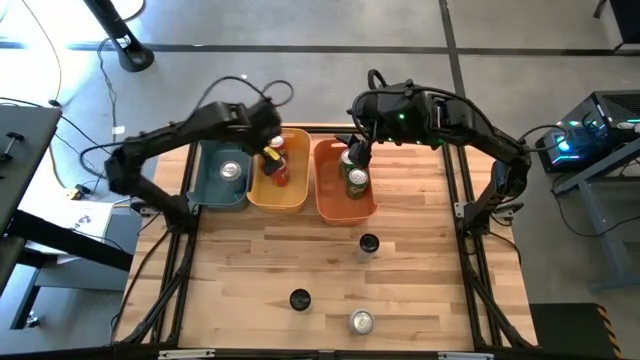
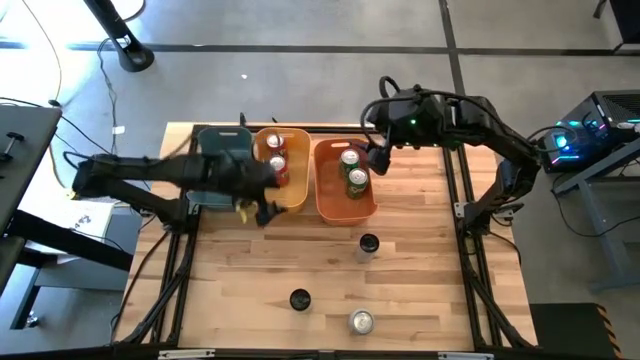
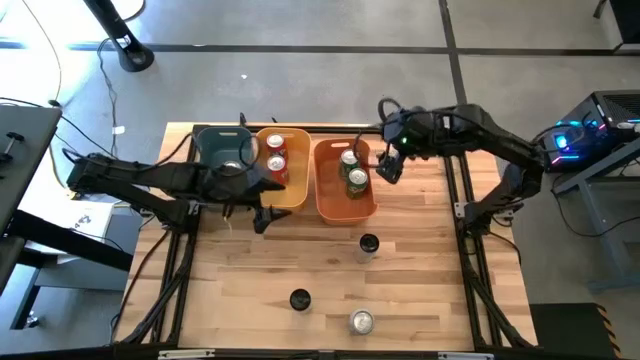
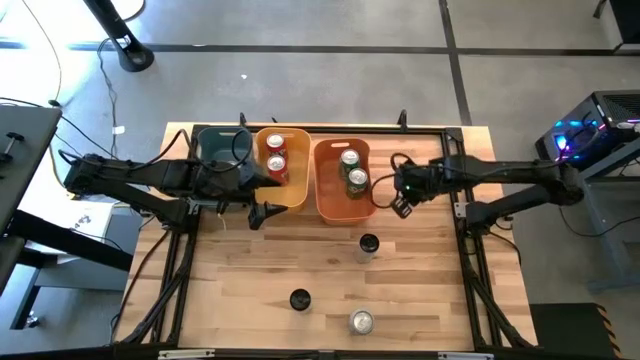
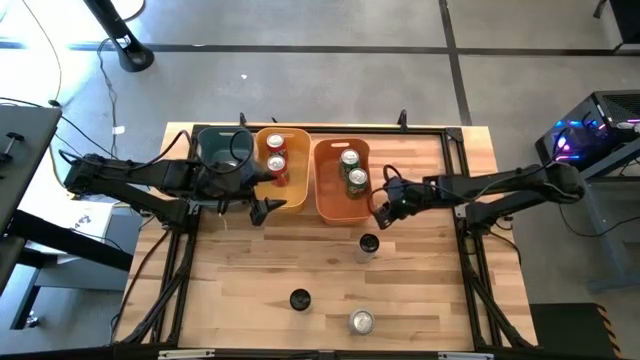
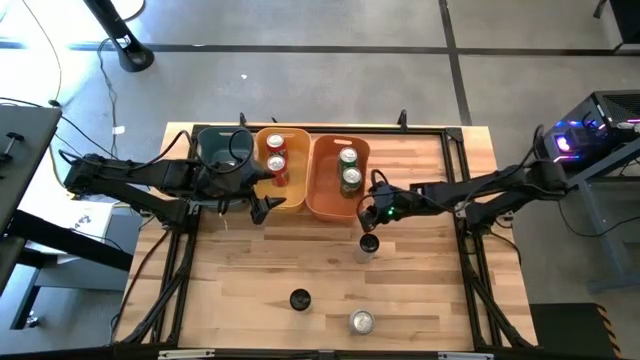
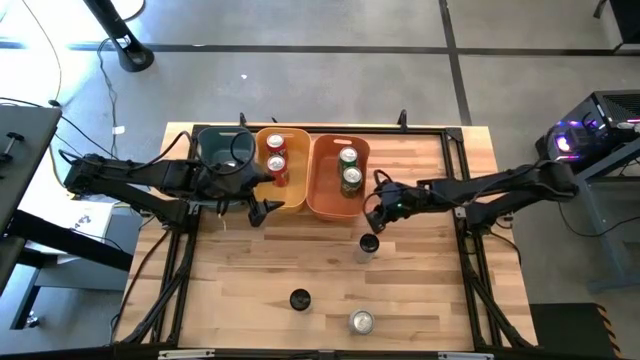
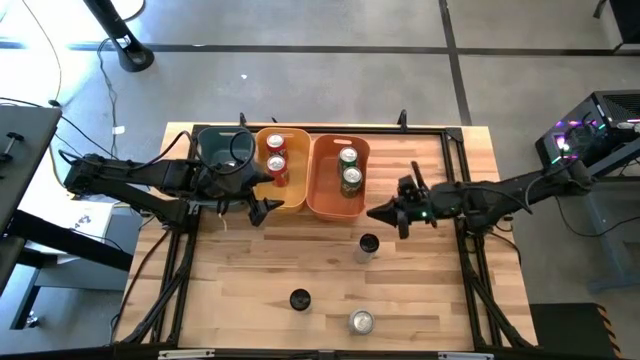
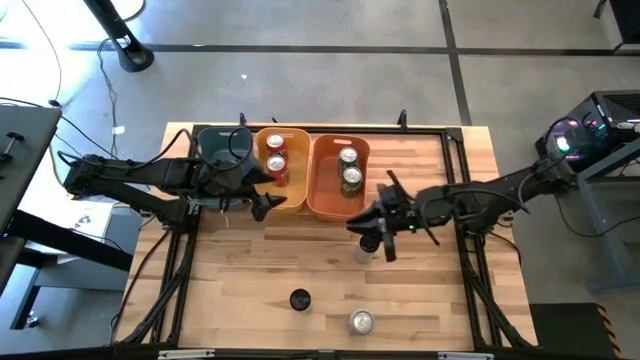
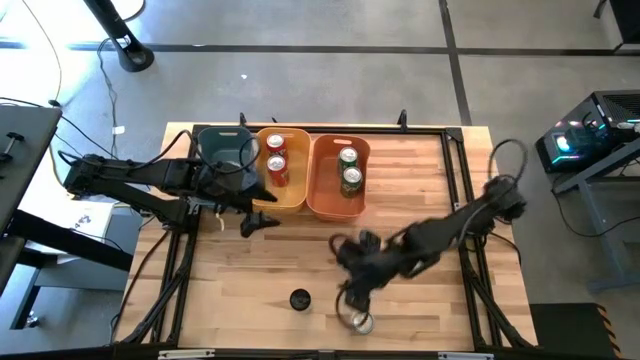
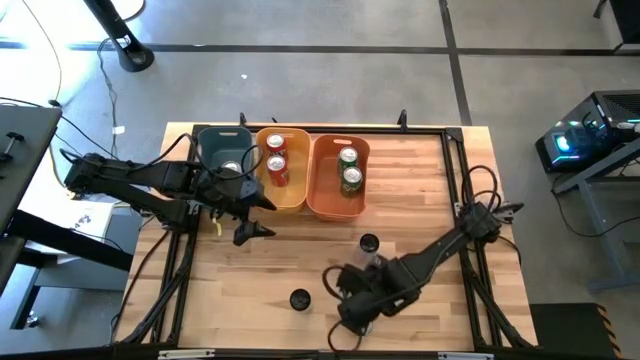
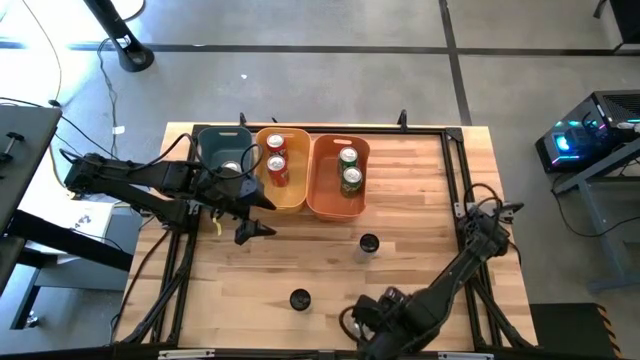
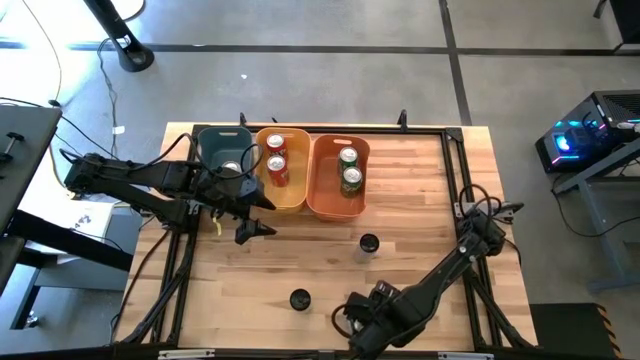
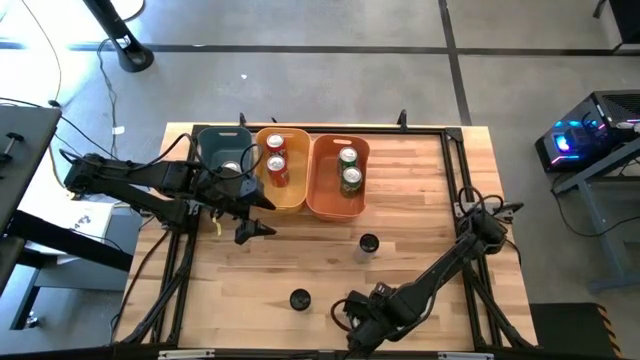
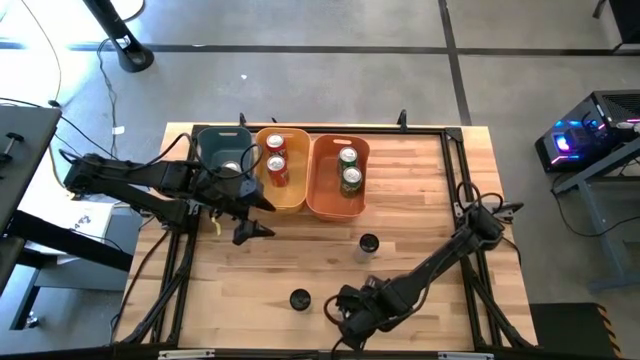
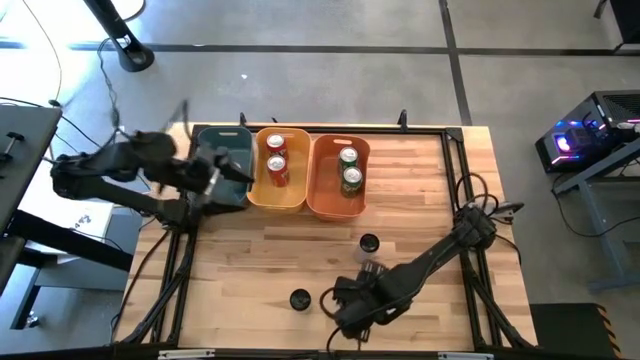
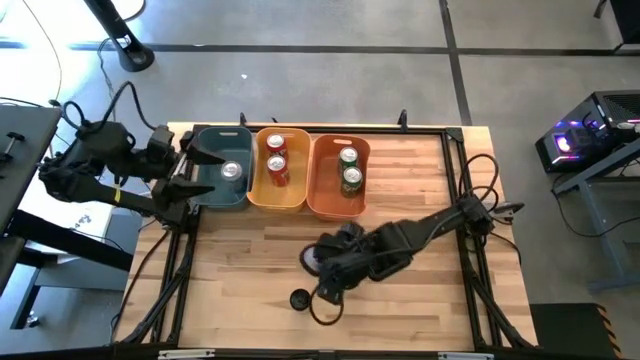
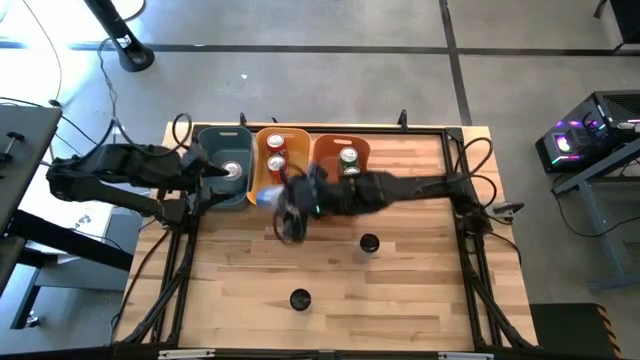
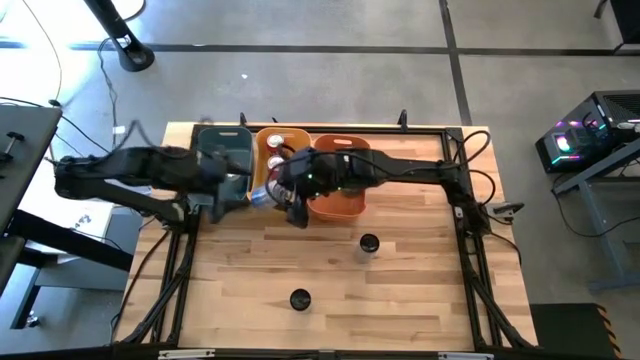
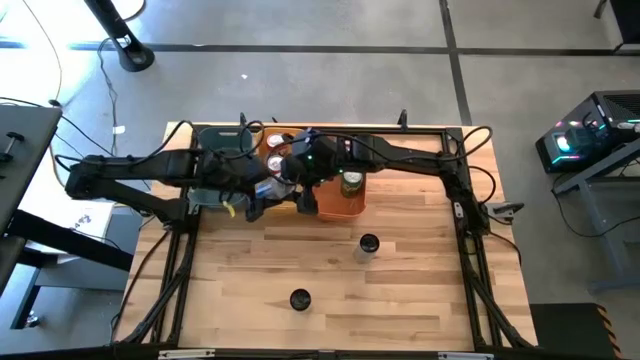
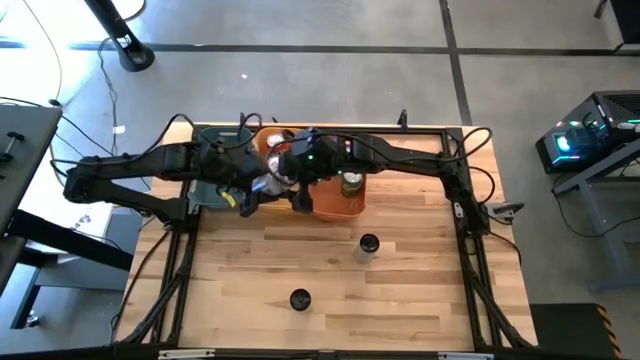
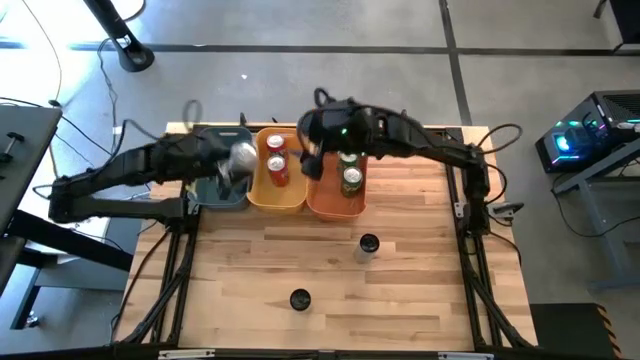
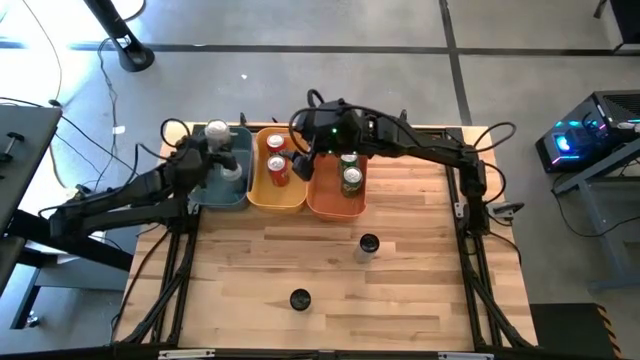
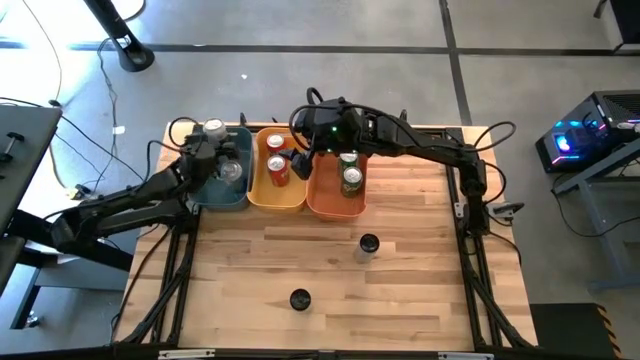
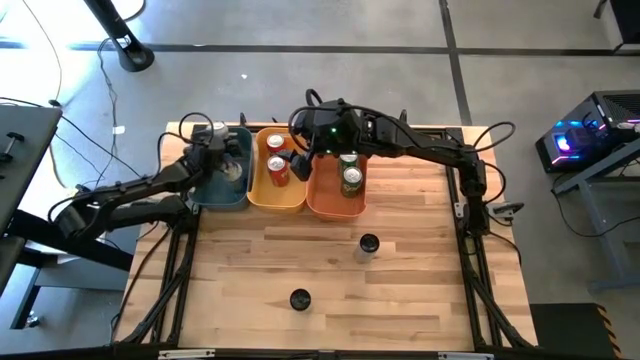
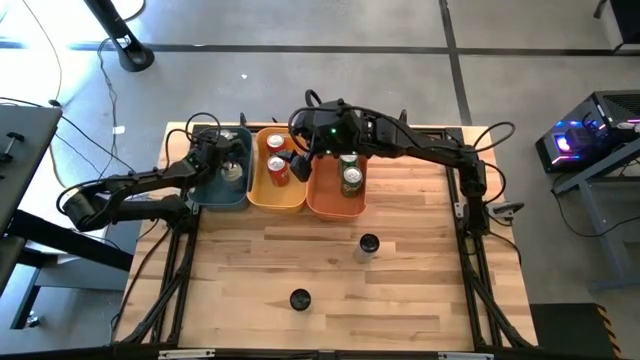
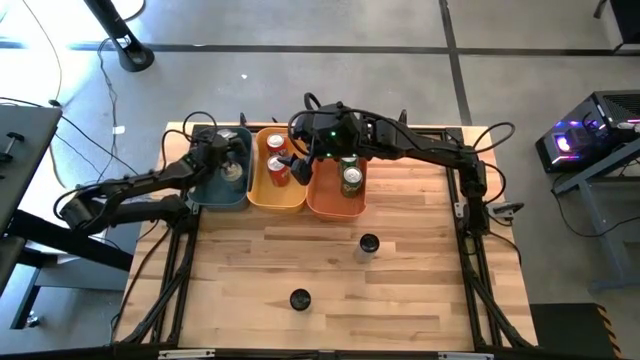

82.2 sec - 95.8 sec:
Task: Sort soda cans
Put the white soda can into the green bin

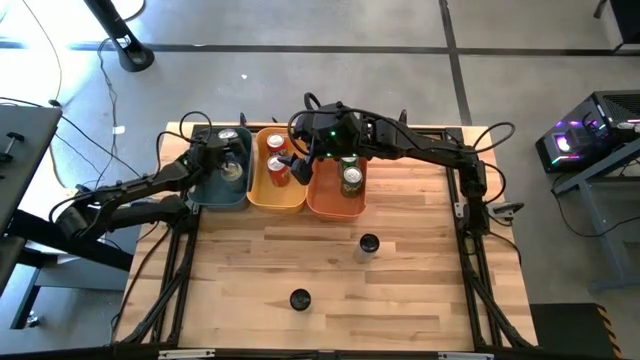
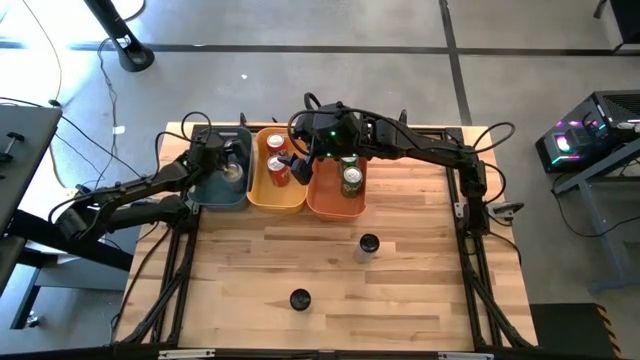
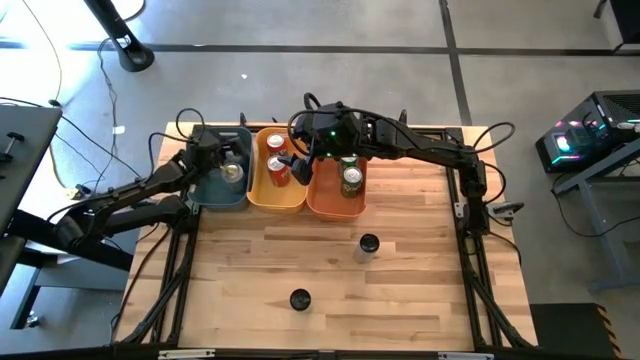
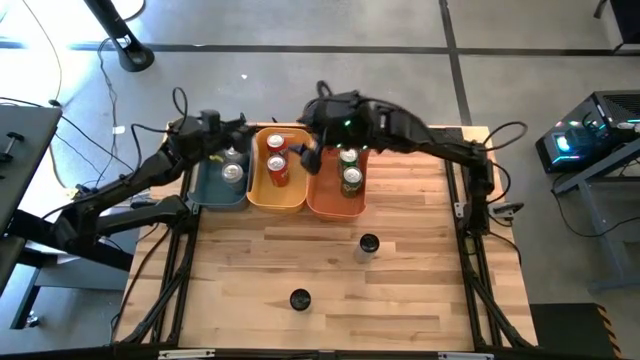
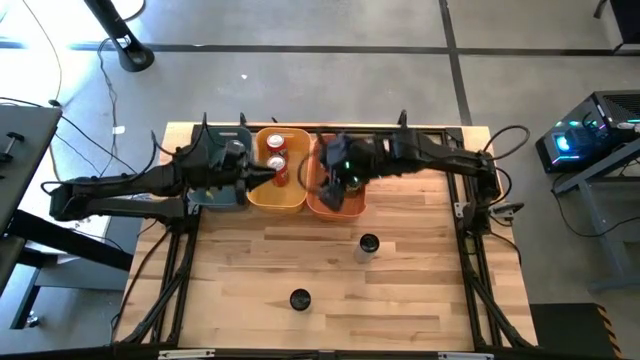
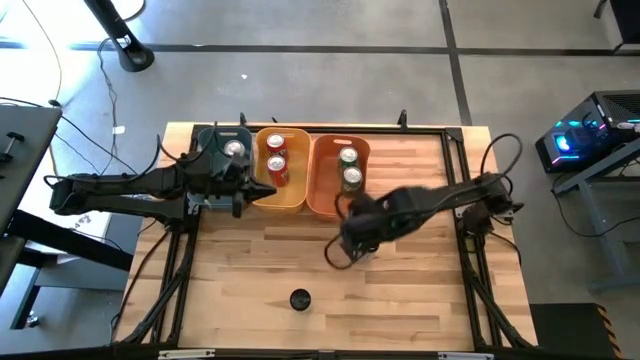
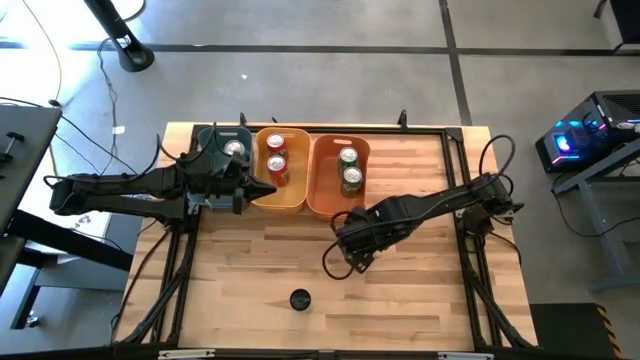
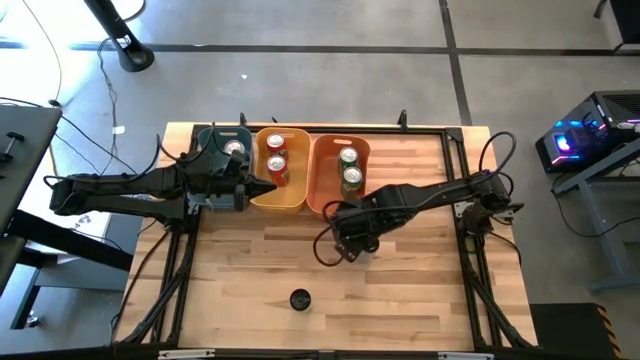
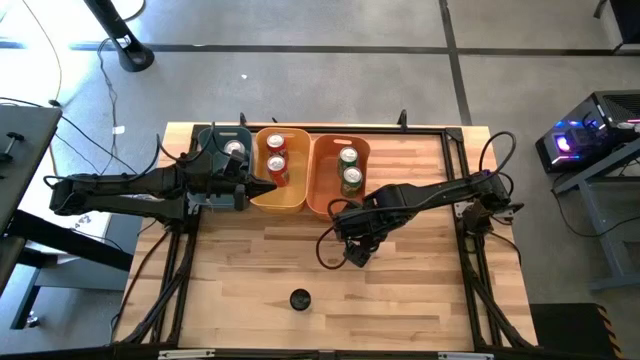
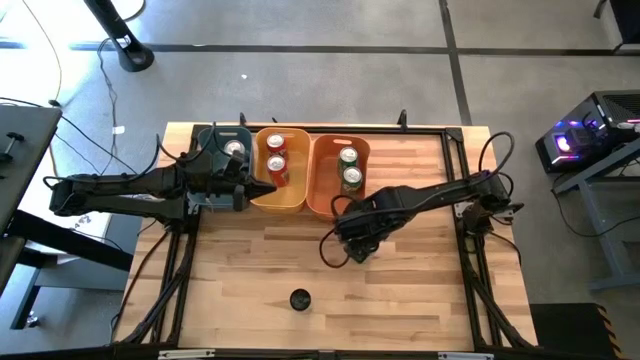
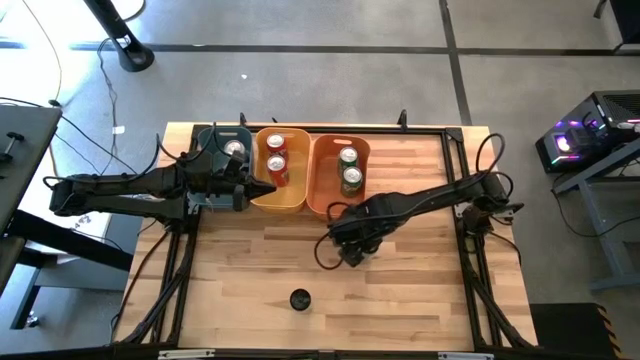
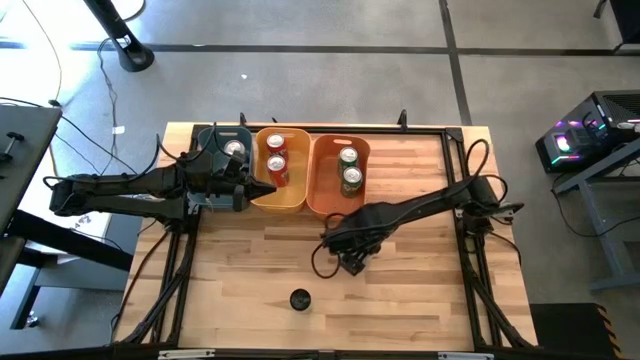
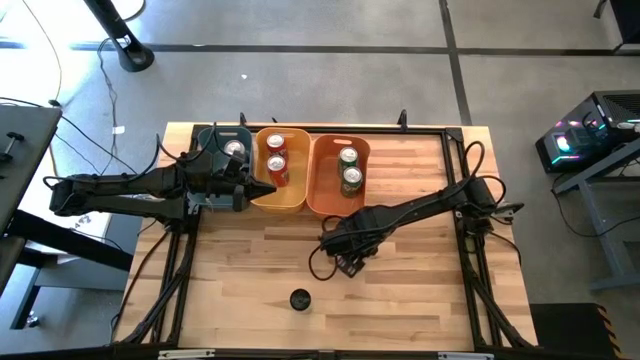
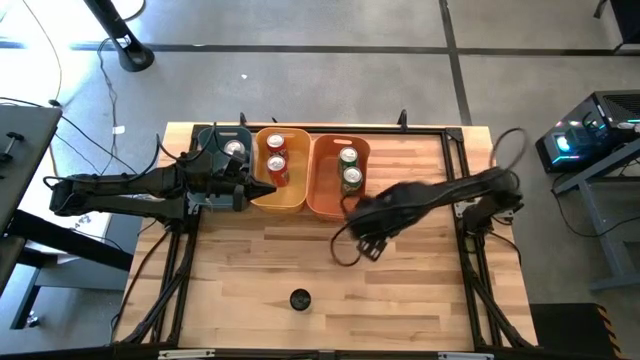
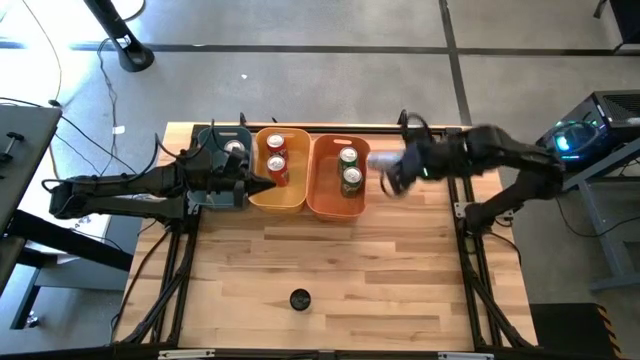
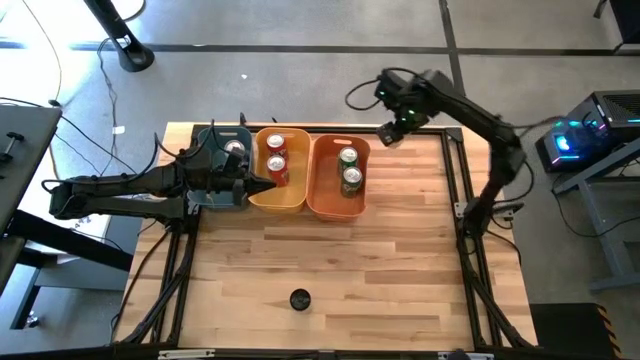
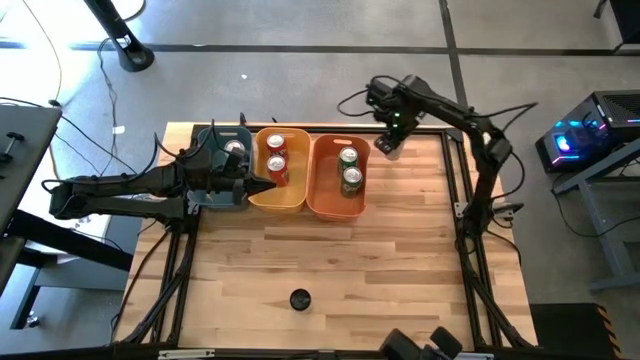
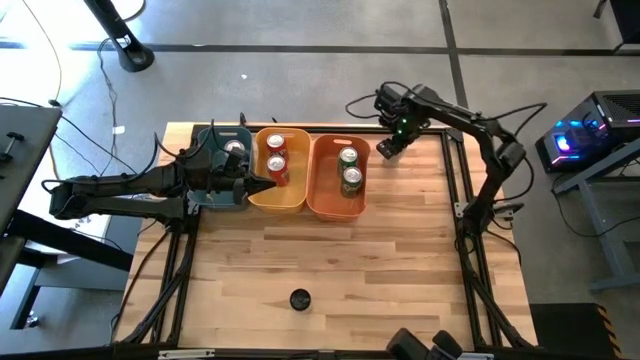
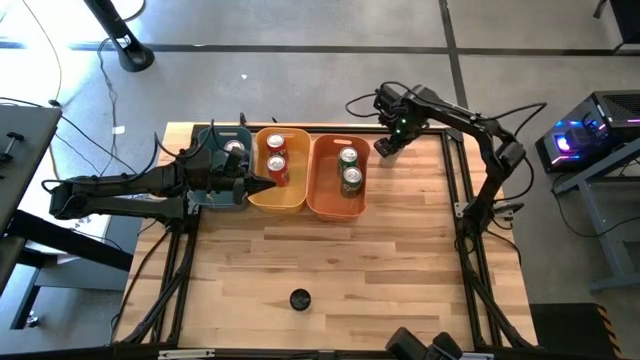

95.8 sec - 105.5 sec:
Move the top black soda can to the right of the orange bin
